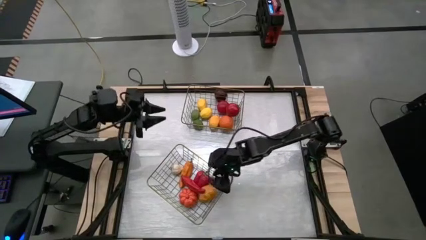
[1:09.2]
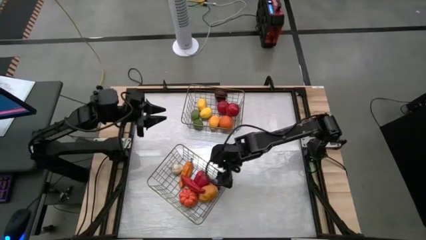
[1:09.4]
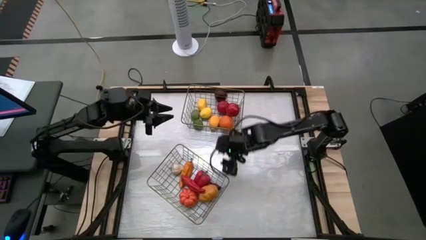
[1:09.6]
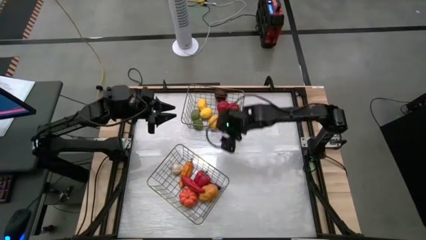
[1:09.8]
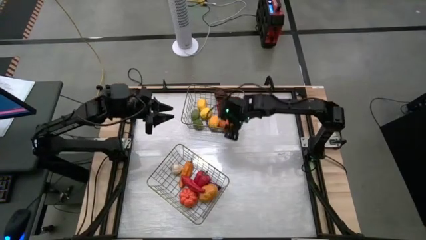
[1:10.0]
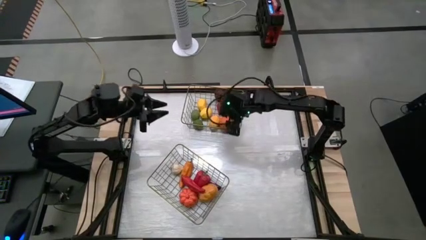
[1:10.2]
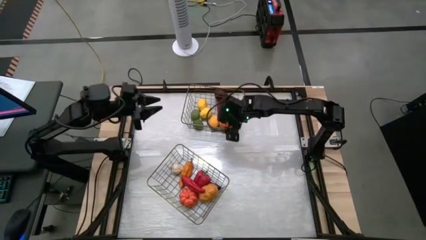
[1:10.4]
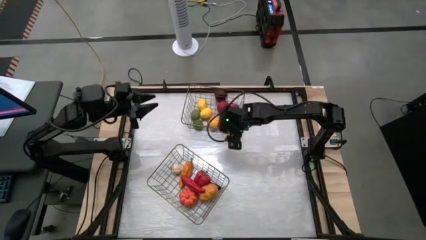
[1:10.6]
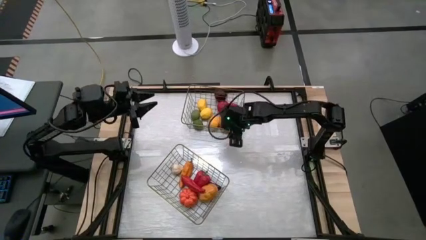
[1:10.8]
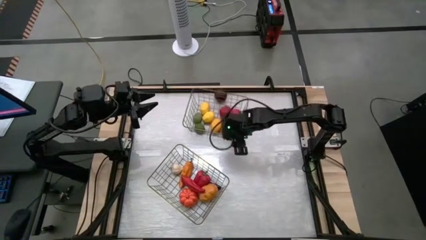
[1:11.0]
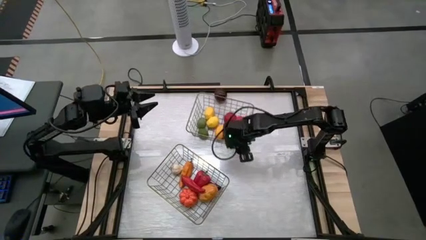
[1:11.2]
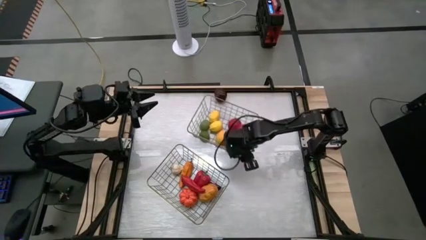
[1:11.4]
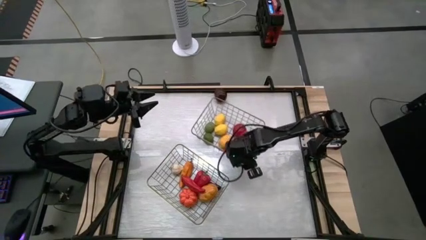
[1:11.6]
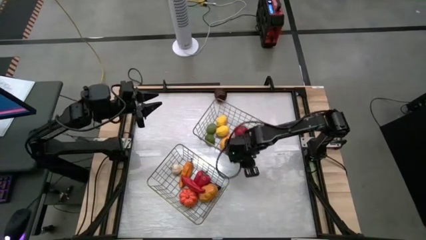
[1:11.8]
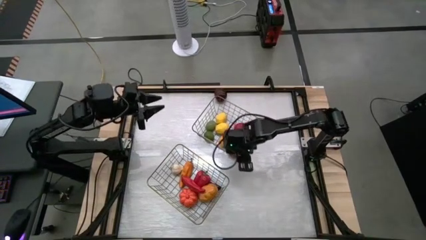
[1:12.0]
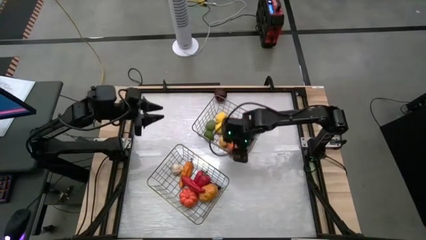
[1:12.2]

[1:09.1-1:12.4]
Task: Sort produce into baskets
Adjust the top wire basket

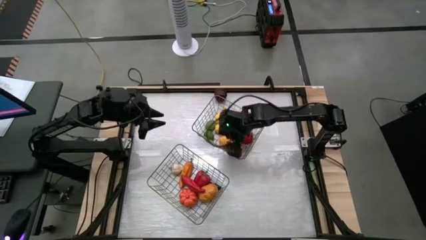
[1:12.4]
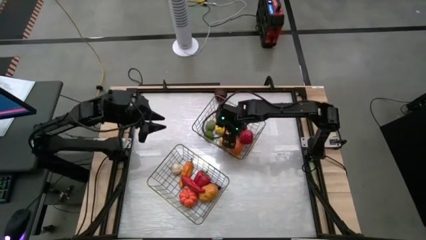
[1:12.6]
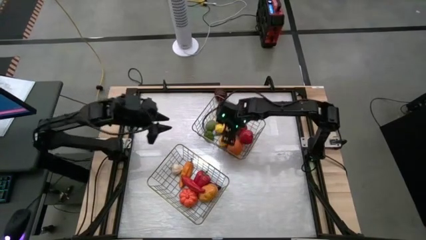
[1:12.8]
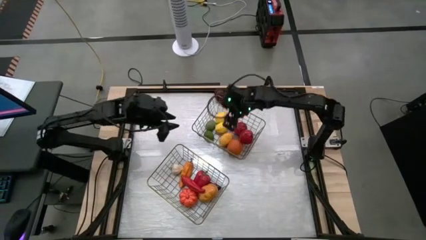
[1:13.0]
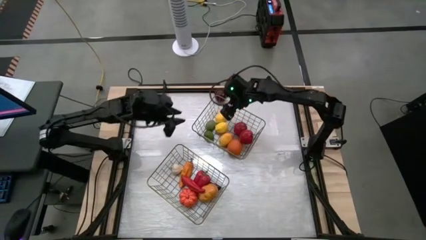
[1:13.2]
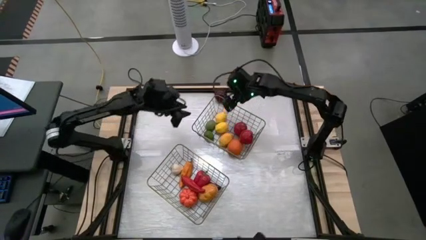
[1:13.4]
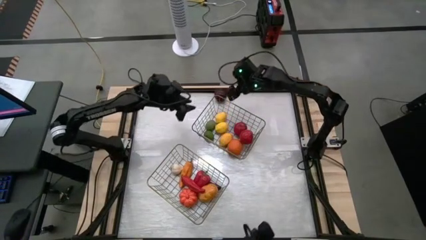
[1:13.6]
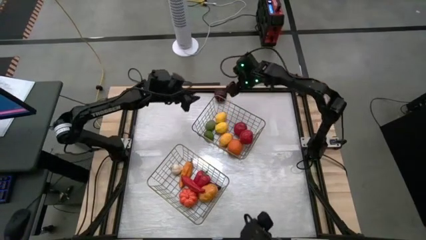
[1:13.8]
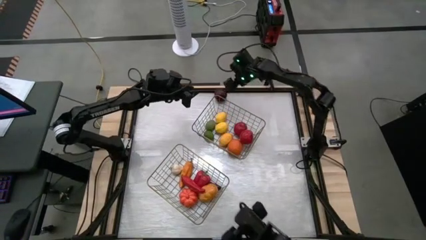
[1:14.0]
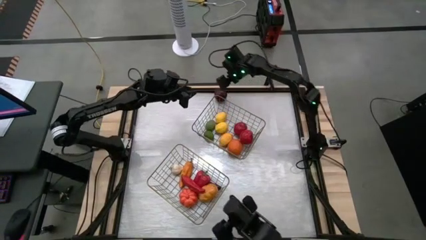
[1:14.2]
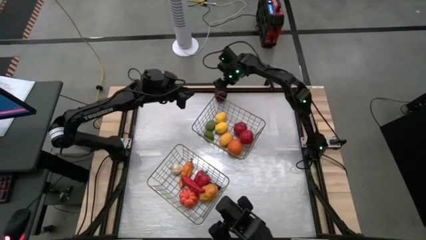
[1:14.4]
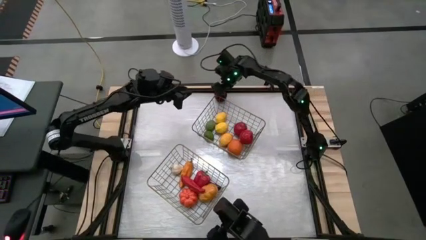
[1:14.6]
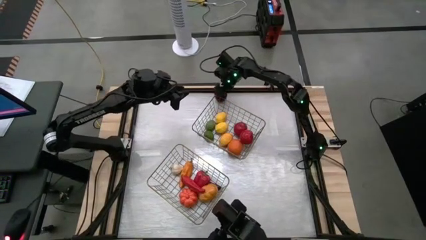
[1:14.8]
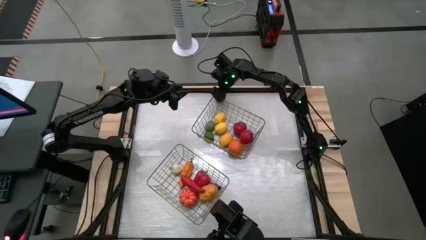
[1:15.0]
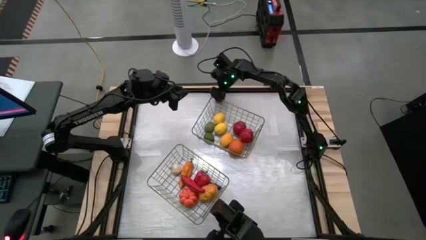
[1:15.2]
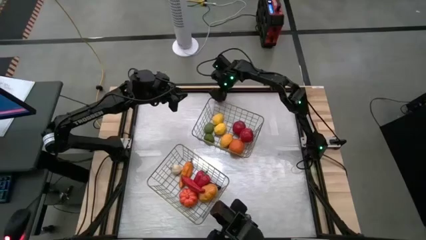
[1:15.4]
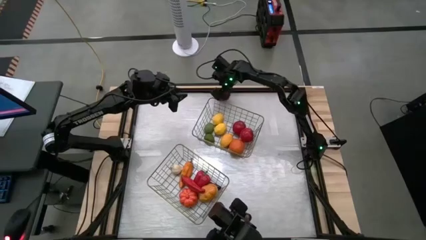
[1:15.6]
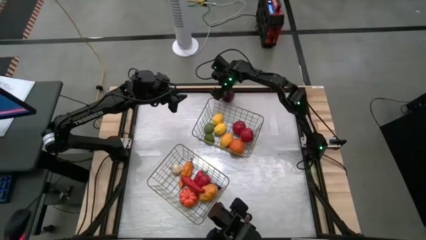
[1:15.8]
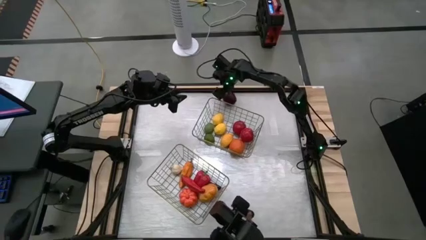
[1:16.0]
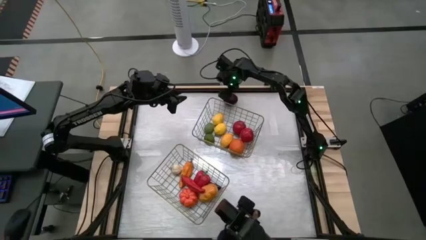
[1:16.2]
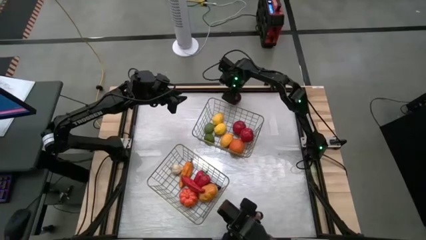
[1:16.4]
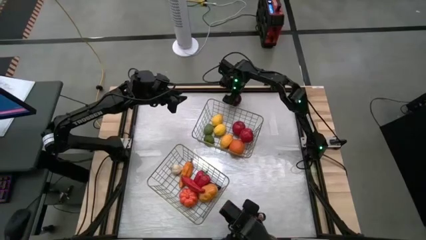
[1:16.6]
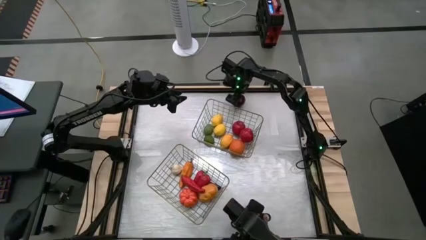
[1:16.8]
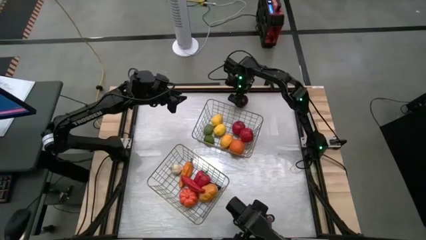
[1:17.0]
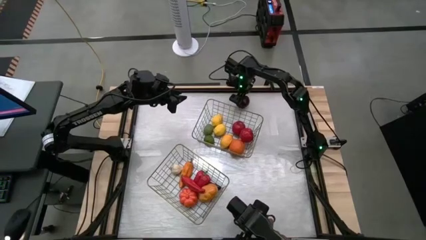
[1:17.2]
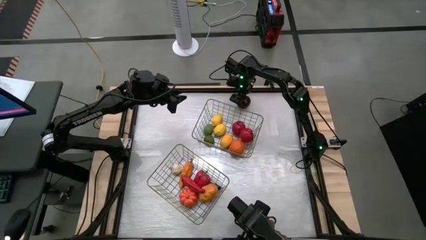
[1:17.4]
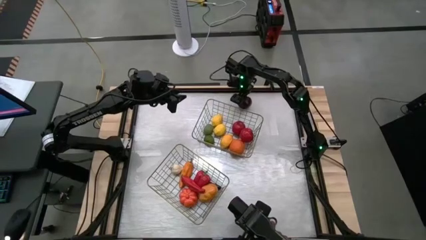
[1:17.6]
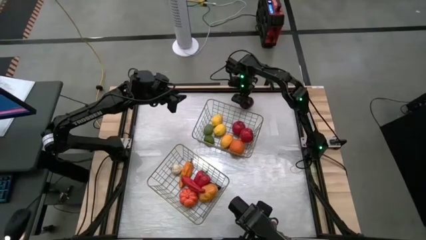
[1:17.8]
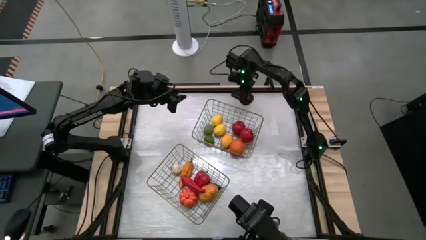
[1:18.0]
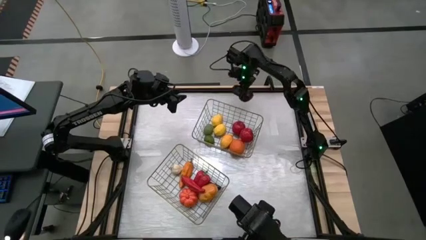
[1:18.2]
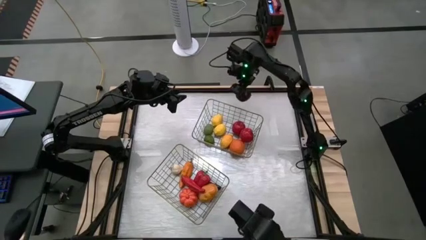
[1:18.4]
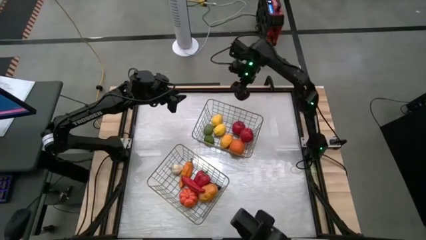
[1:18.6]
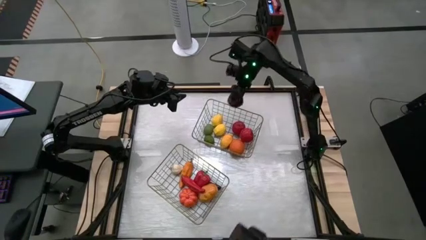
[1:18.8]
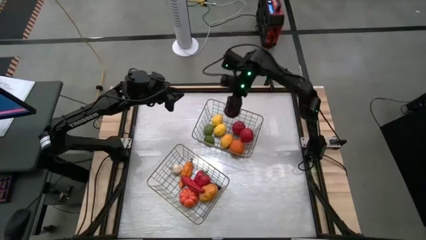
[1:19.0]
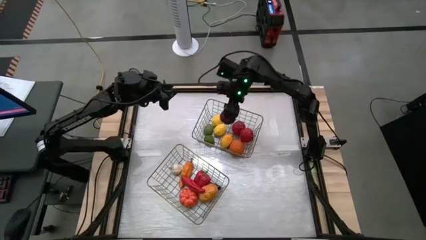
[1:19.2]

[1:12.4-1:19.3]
Put the dark red apple fruit into the top wire basket

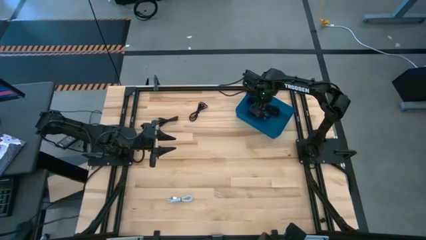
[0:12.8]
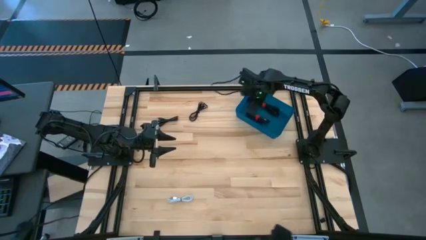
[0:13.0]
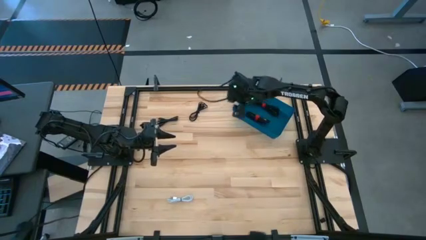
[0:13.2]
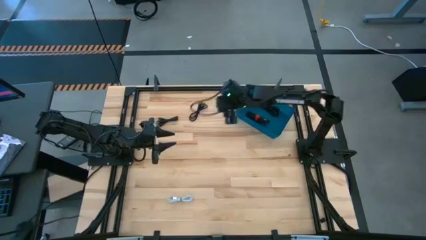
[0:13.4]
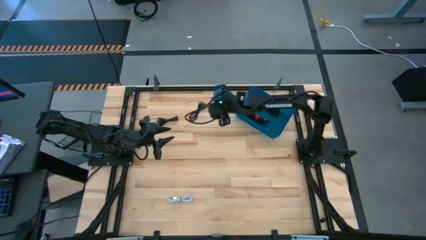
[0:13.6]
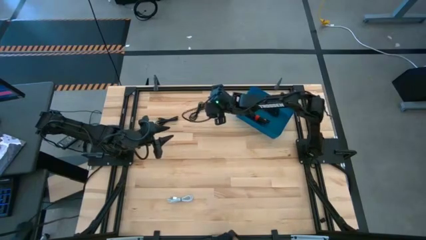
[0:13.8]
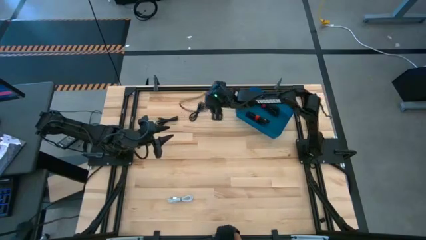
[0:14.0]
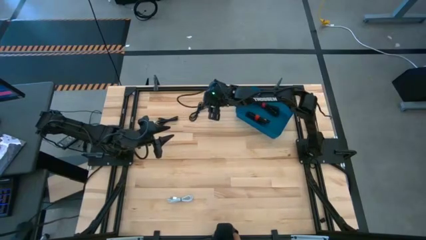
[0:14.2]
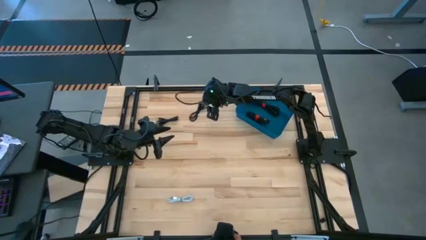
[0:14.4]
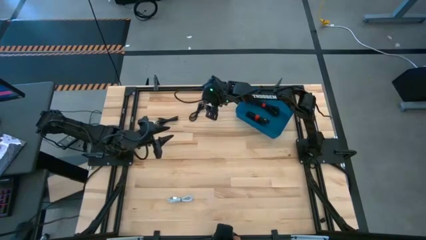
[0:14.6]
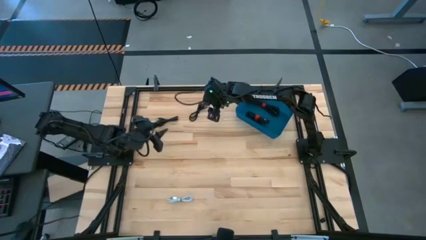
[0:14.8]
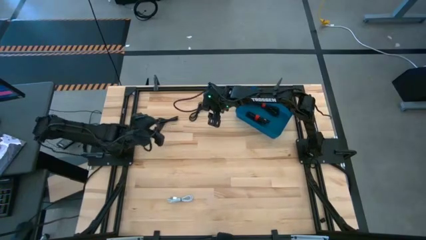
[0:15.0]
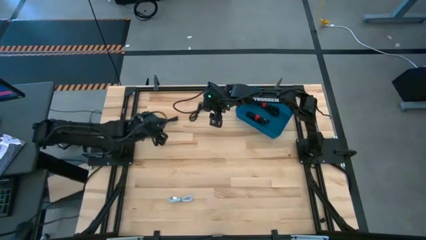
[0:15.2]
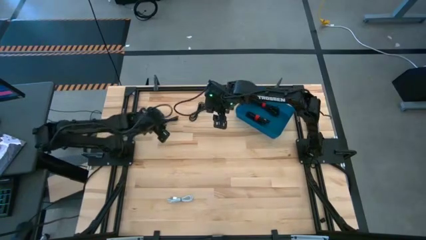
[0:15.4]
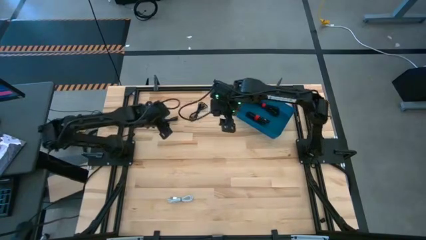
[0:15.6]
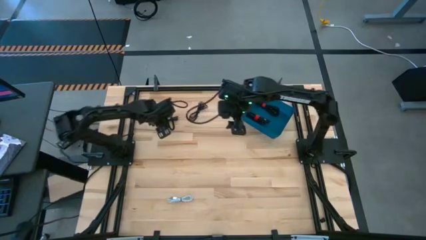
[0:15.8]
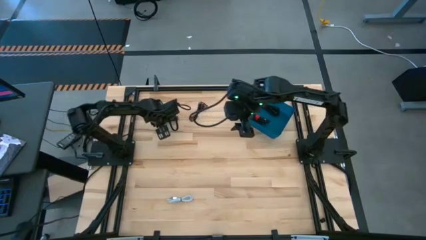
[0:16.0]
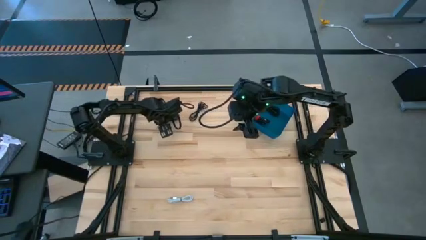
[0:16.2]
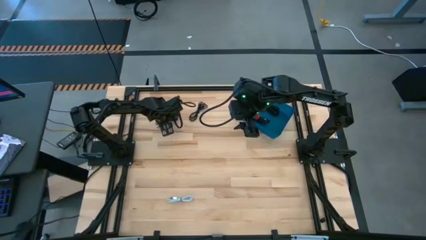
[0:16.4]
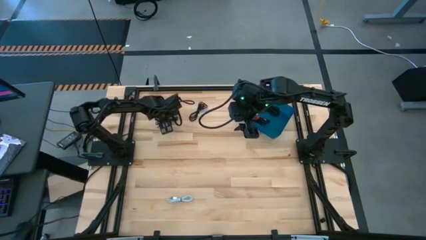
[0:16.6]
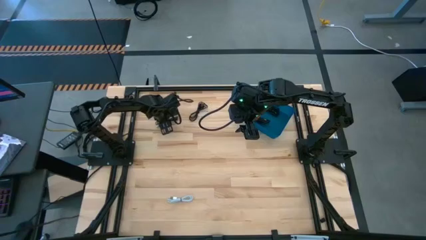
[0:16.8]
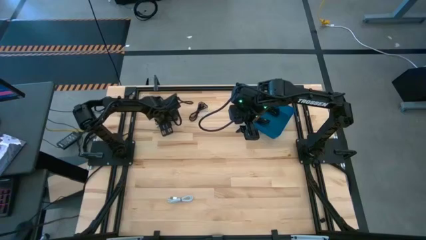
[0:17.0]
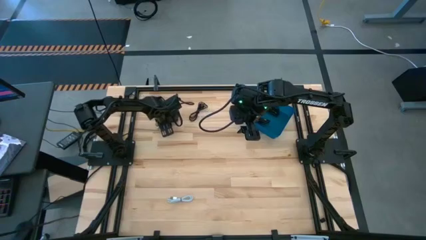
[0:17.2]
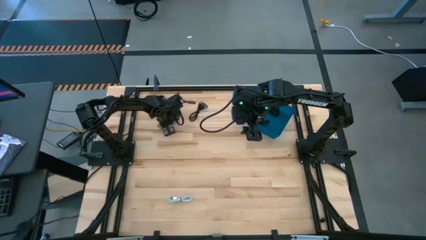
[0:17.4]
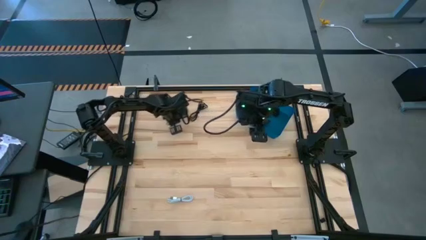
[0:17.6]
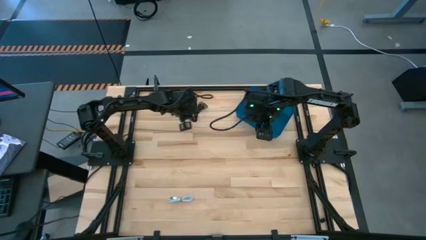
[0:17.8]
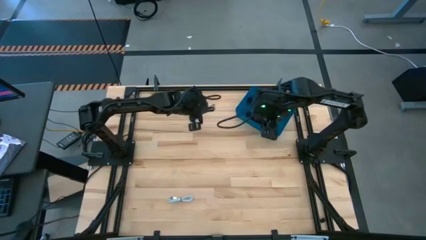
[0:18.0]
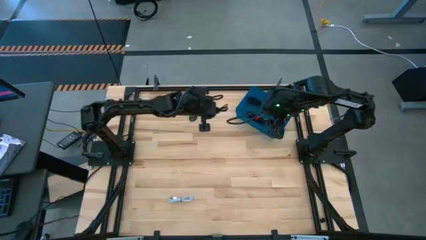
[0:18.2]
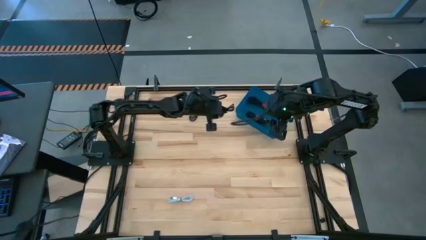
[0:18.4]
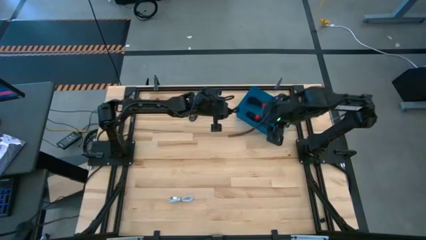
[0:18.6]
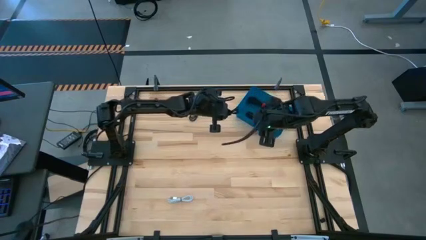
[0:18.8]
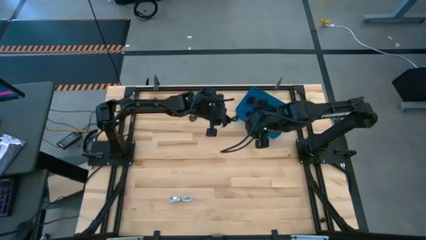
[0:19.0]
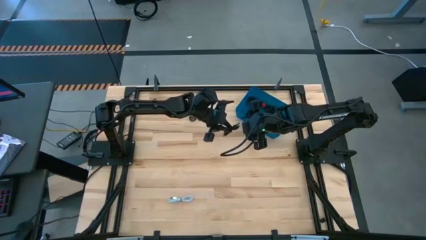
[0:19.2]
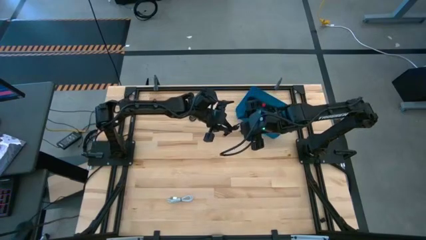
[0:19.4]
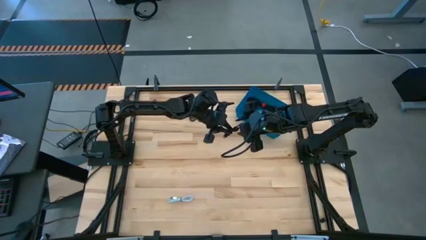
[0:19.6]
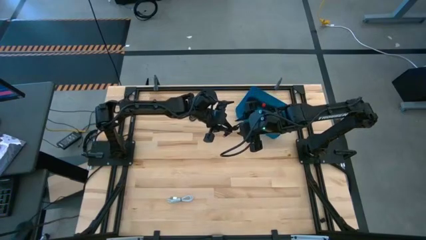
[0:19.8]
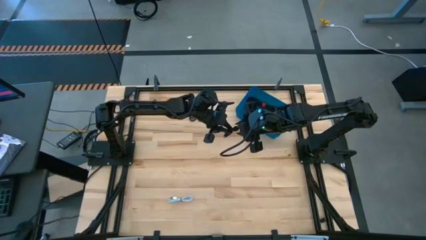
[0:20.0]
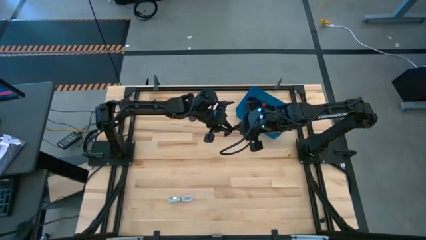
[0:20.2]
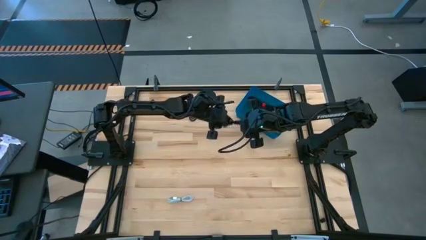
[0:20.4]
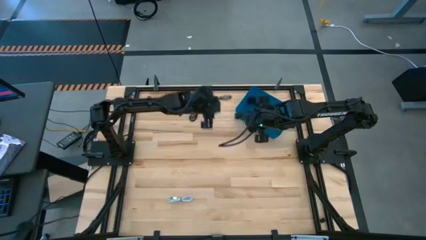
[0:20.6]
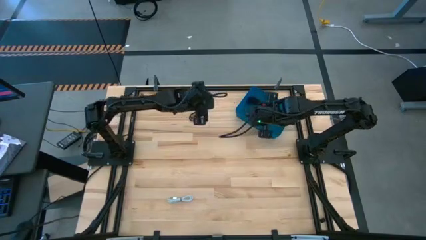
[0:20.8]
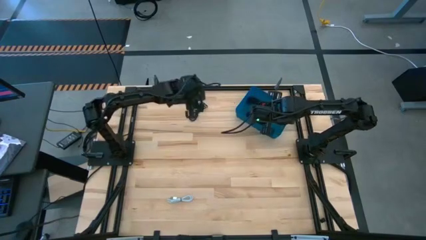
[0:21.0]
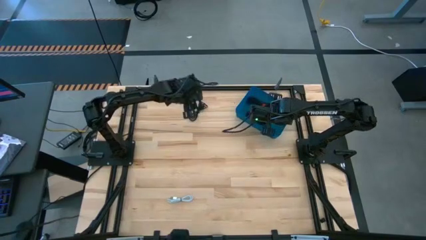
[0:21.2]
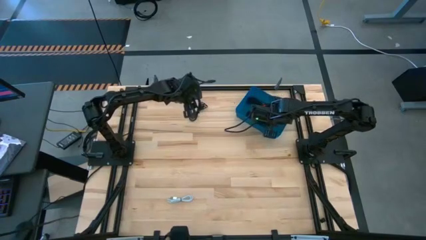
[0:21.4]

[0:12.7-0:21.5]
Task: Pick and place USB-C Cables
Put the left black charger cable into the bin
